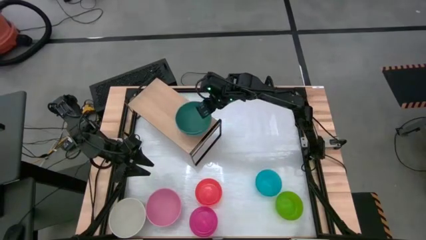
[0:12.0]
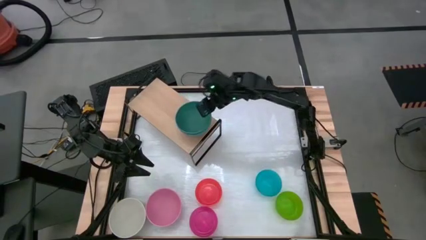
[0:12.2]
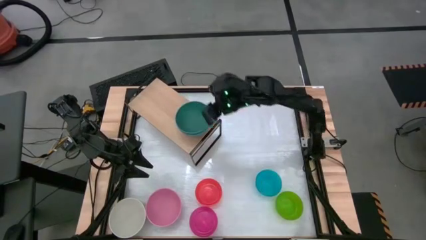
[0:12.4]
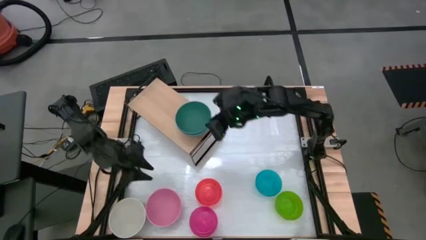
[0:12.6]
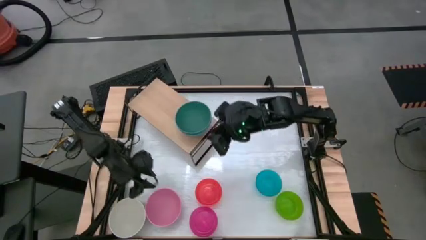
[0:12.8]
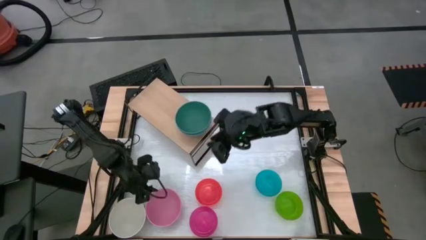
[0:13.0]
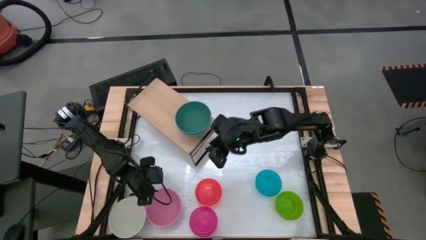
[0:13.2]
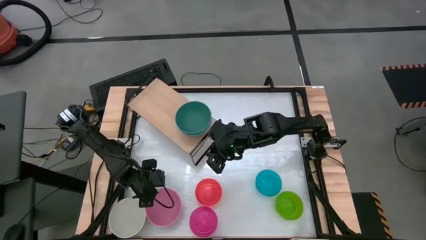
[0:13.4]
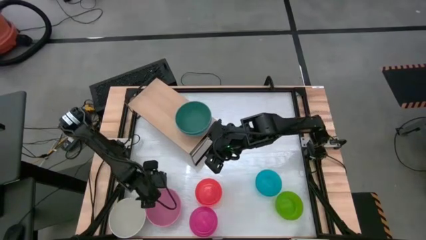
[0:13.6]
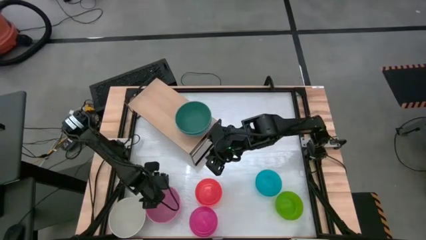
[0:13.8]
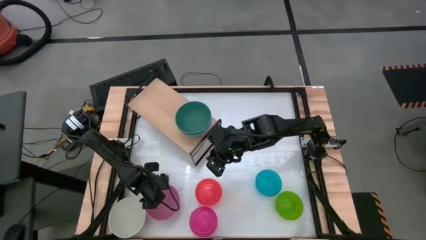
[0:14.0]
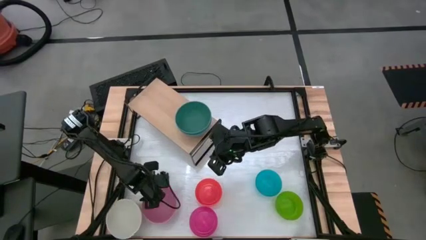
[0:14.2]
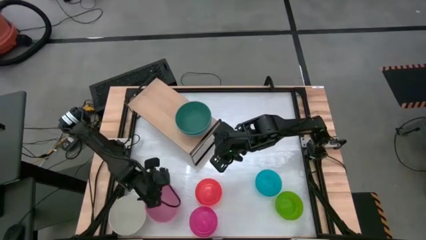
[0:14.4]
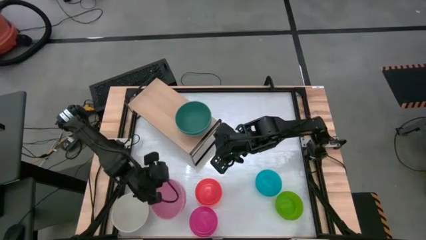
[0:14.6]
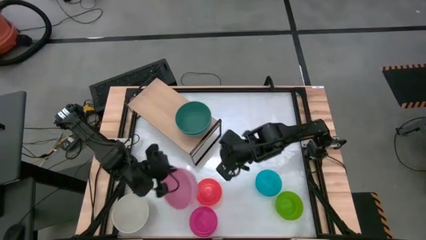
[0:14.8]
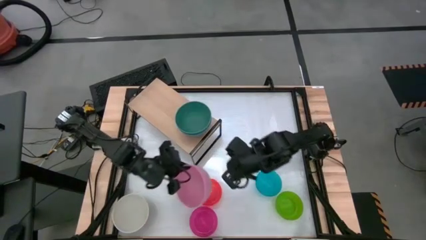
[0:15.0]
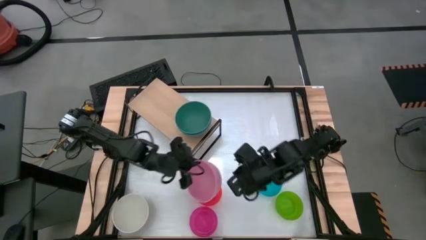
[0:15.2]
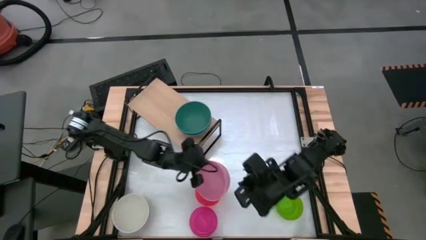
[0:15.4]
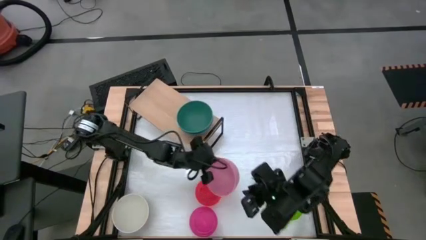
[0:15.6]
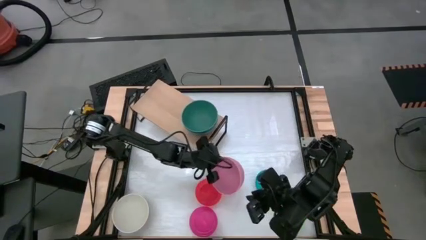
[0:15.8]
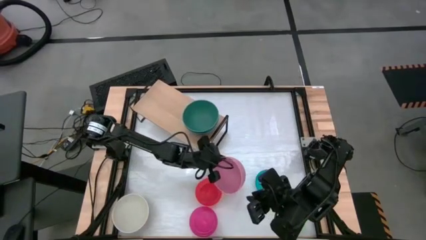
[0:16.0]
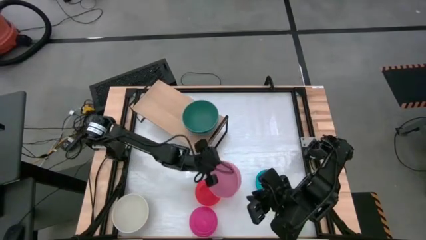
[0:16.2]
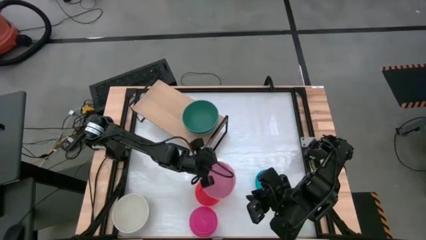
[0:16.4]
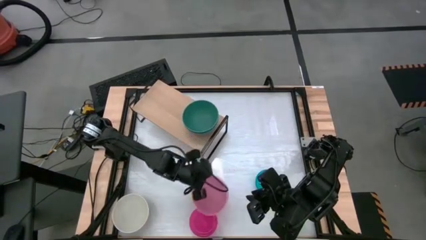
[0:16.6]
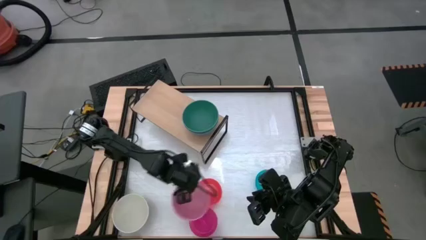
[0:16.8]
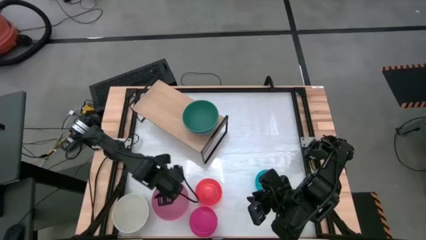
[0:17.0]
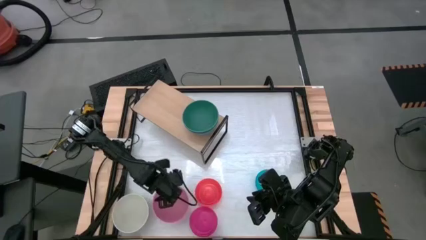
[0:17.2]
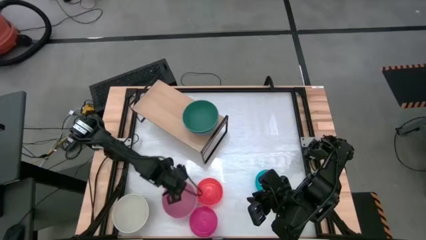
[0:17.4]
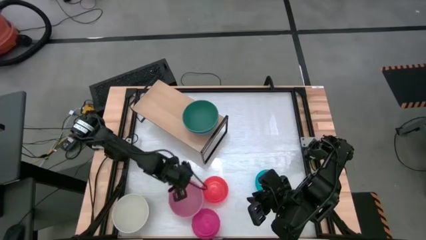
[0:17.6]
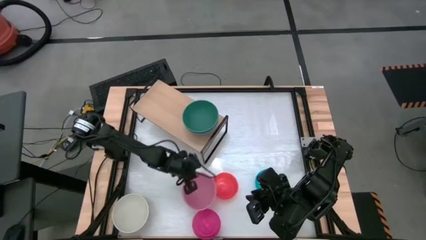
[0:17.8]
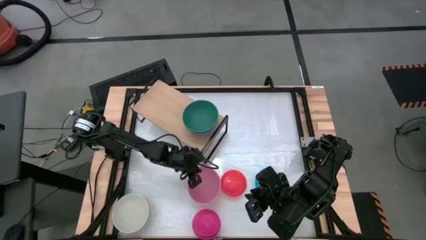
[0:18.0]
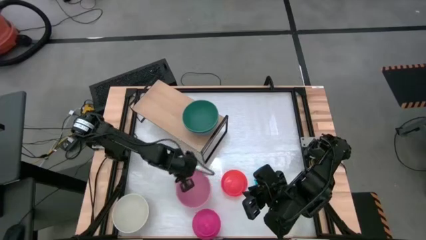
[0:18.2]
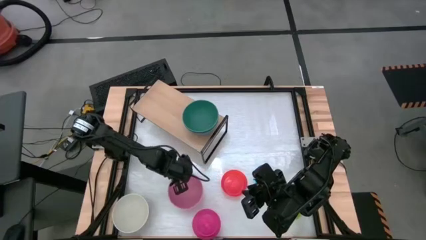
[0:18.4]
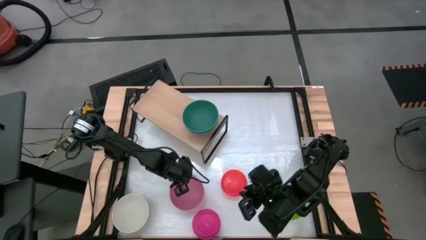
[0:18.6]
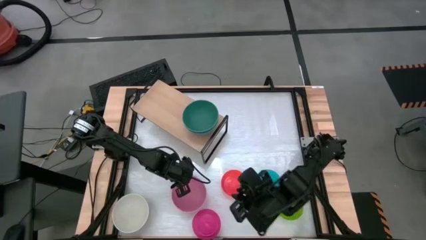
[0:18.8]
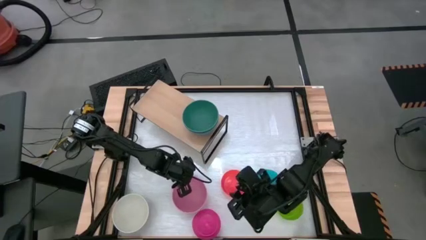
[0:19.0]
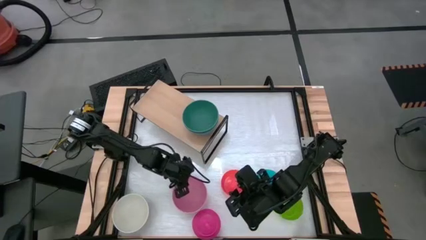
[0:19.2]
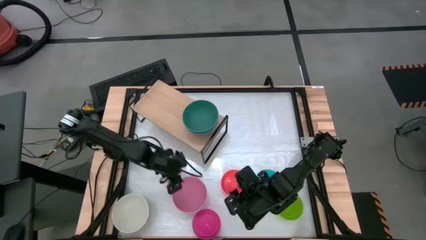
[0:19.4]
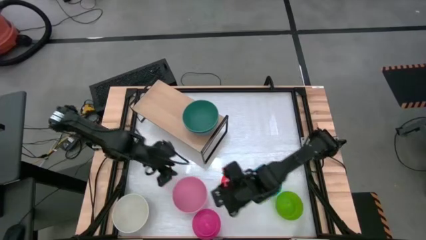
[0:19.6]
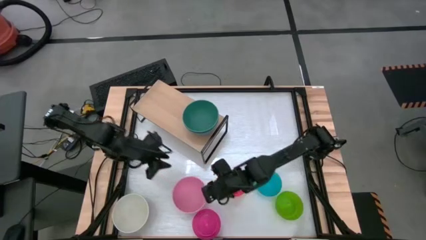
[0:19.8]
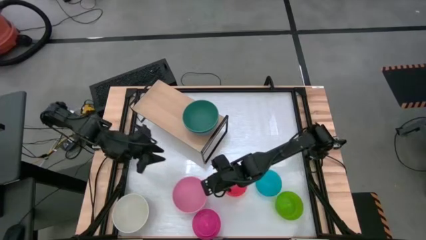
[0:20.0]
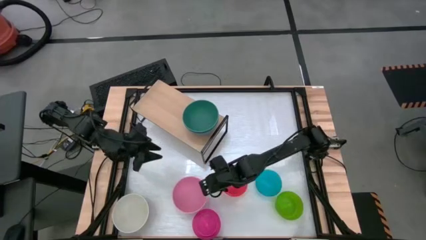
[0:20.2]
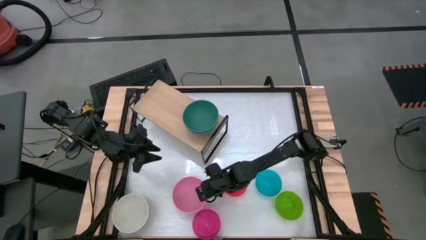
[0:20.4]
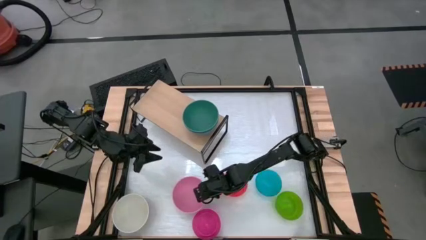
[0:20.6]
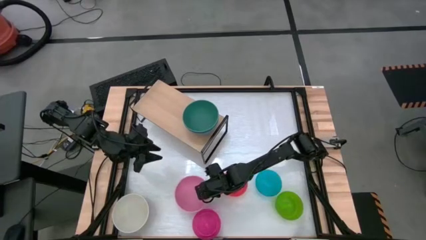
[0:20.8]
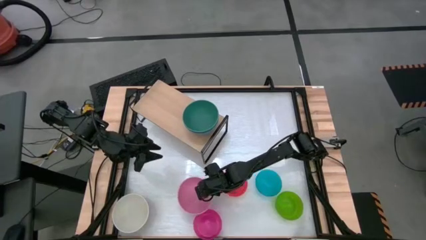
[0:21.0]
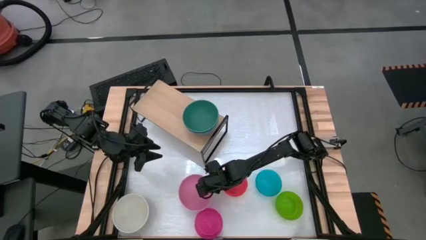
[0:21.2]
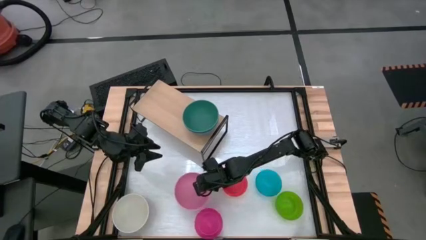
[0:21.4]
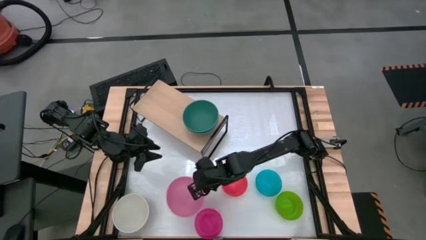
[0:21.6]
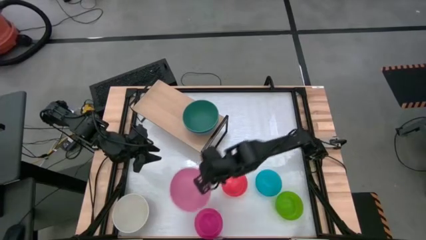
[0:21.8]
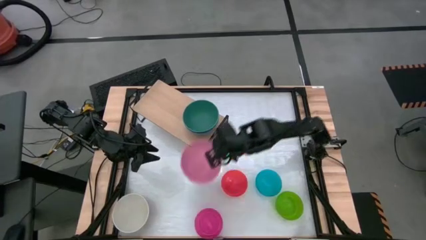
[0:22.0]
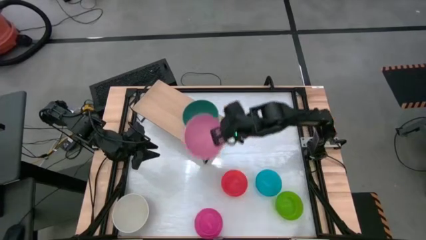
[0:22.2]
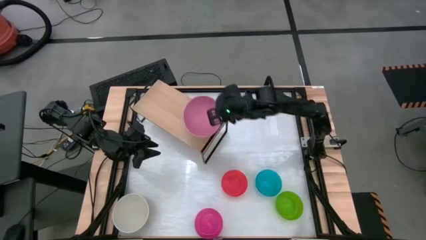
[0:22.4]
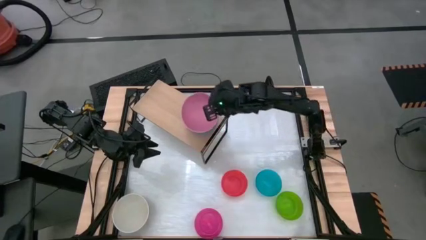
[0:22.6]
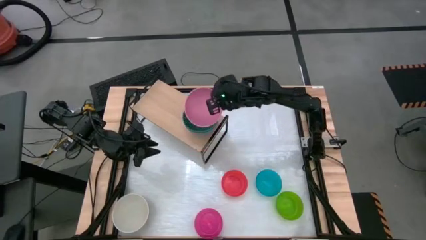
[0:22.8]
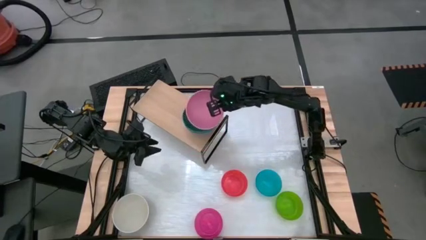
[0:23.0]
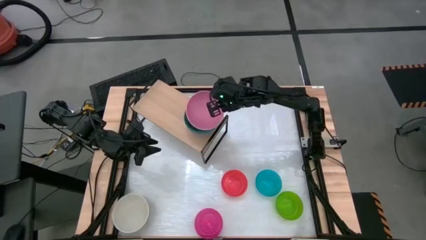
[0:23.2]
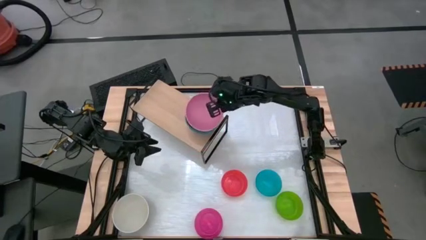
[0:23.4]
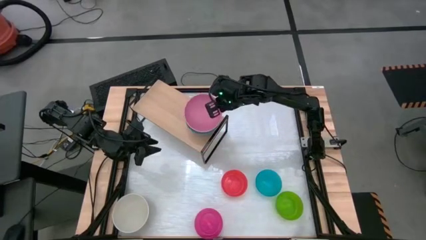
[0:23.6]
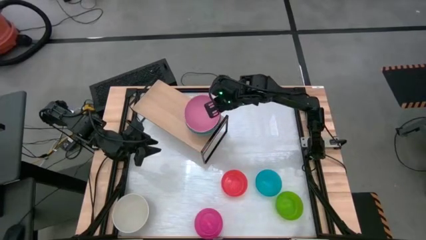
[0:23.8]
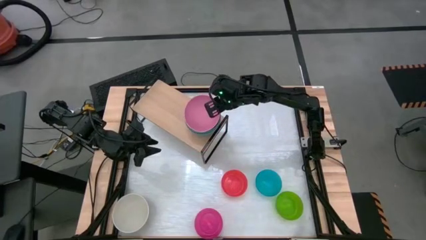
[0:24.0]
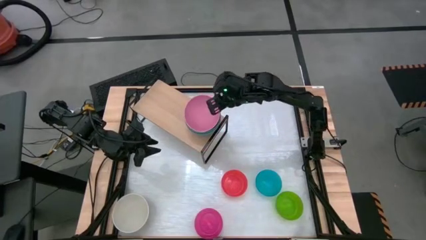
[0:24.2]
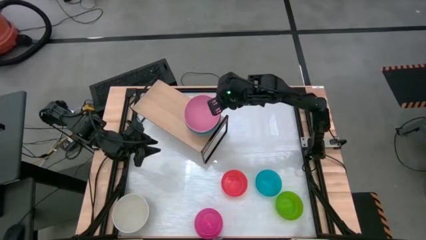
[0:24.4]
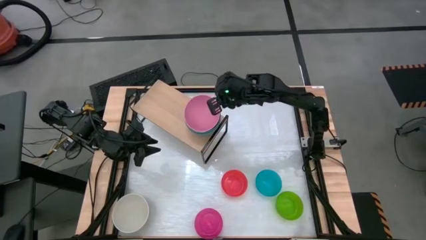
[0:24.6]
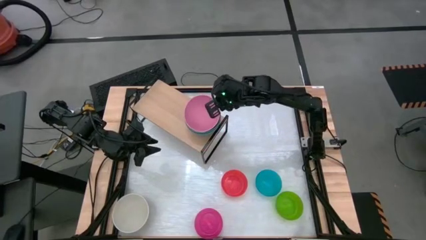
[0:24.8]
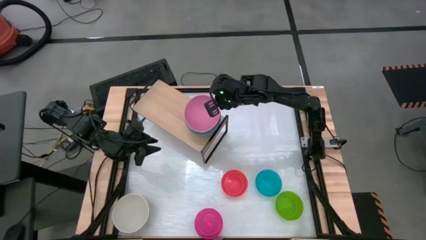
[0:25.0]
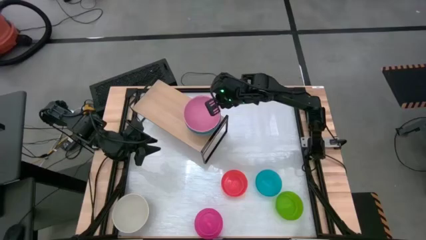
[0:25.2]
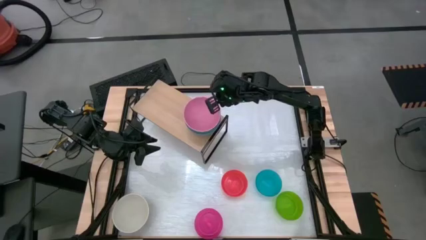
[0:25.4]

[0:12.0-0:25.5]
Task: Place and stack bowls onto a shelf
Stack the pink bowl on top of the green bowl on the shelf

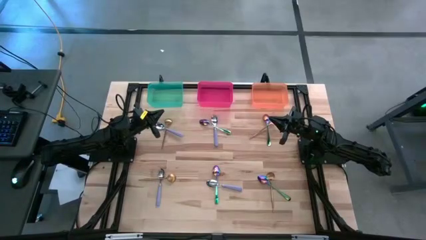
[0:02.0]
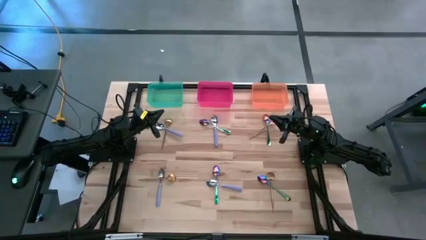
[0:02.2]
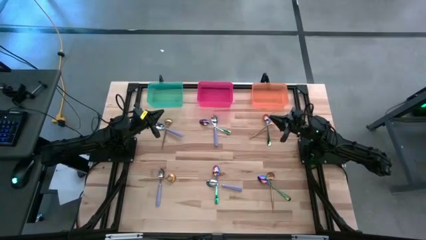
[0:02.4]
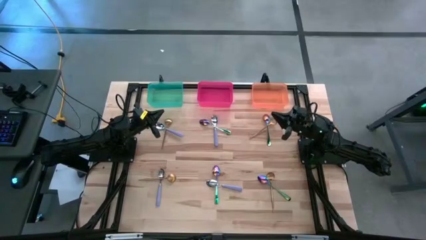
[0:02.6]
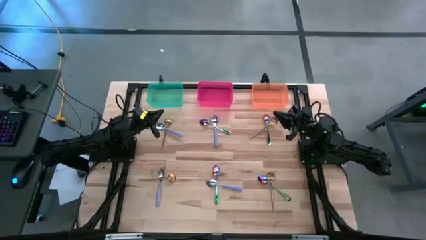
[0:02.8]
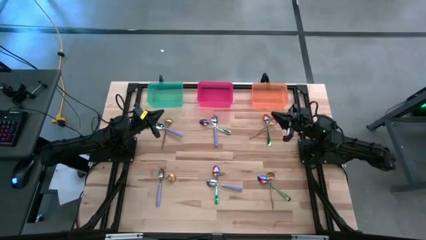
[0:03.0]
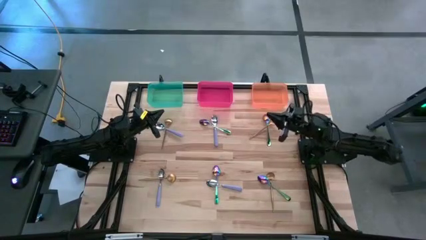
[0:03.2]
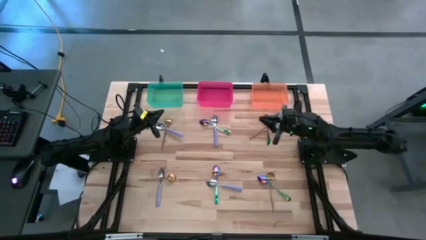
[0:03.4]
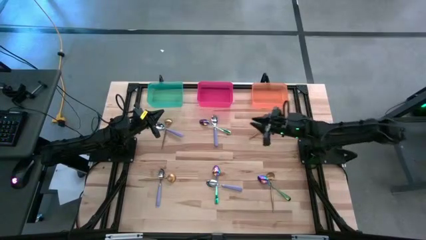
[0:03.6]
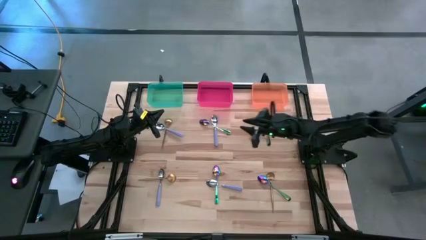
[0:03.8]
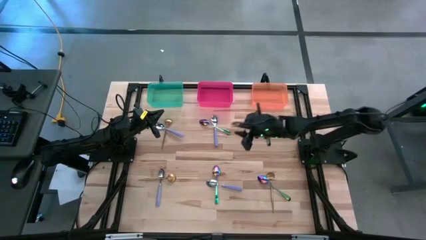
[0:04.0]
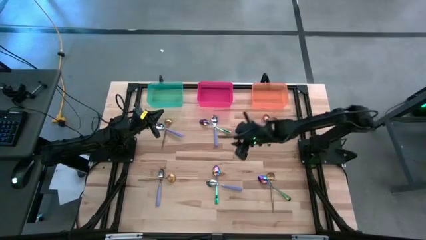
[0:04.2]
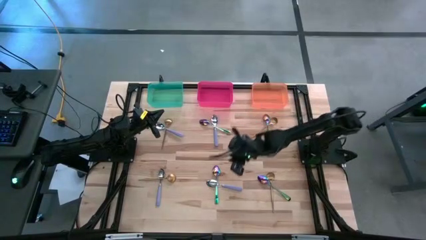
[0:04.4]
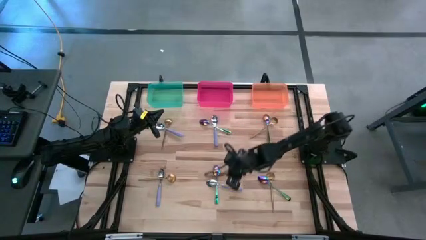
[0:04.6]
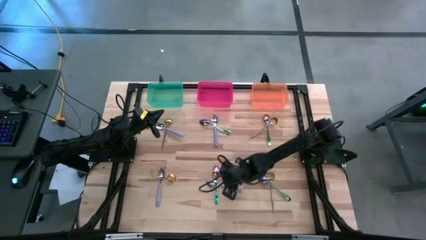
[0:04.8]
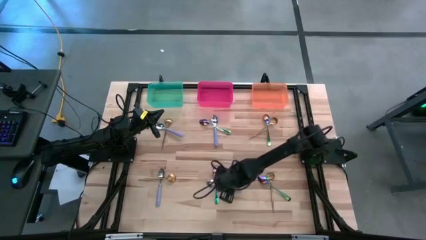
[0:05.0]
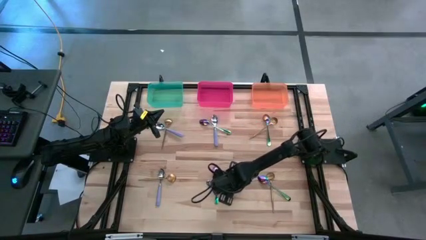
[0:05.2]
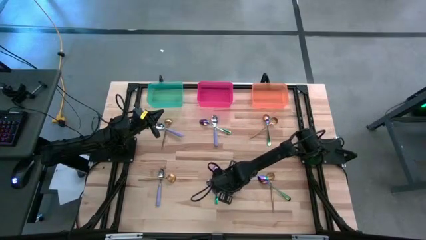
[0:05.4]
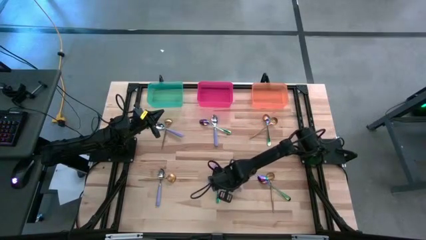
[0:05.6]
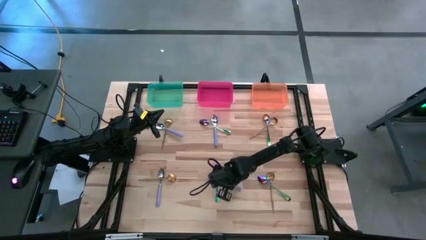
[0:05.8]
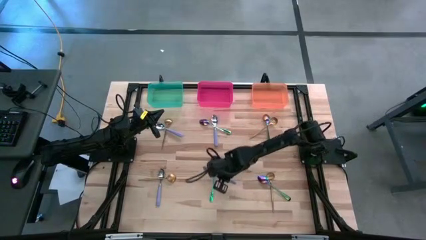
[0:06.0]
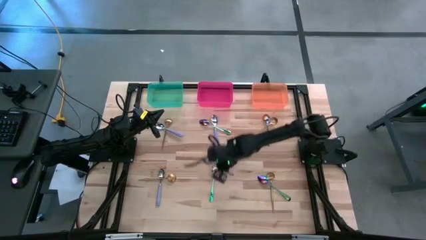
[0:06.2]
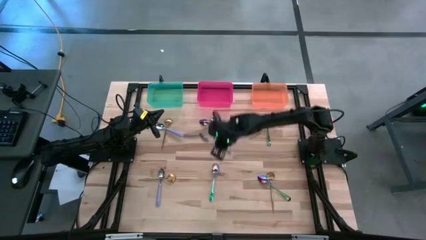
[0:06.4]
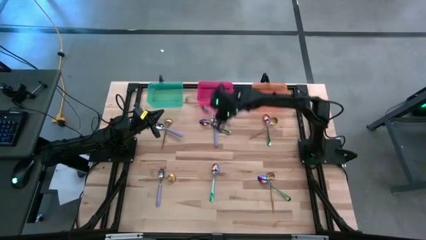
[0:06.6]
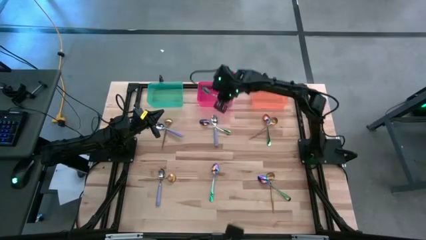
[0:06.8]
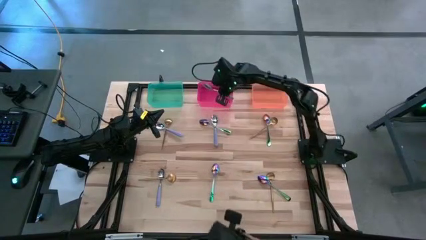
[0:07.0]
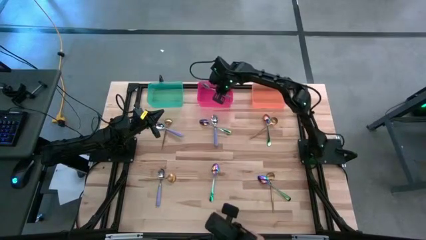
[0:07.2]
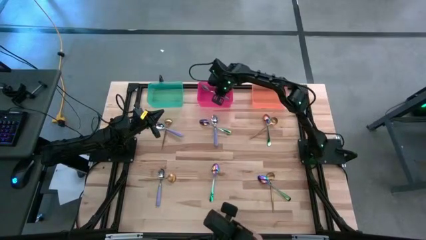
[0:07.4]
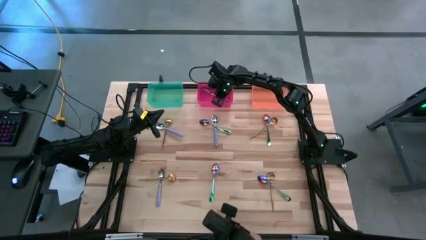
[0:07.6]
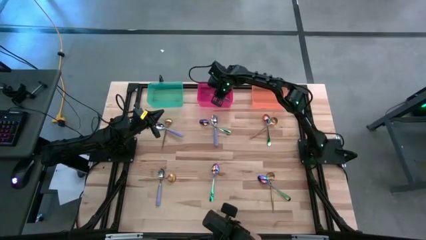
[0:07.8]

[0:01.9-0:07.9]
Task: Sort silverware by color (type)
Put the purple spoon into the red bin
